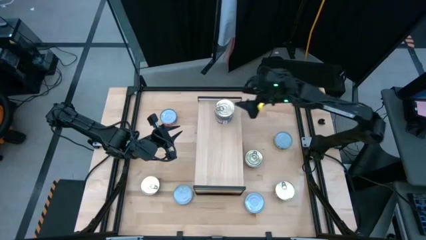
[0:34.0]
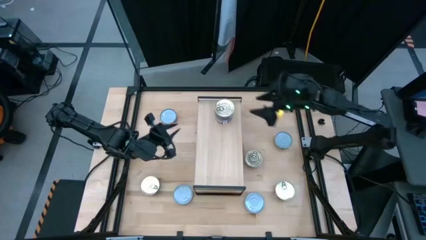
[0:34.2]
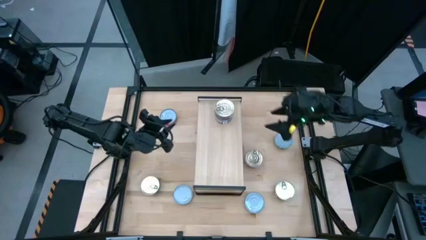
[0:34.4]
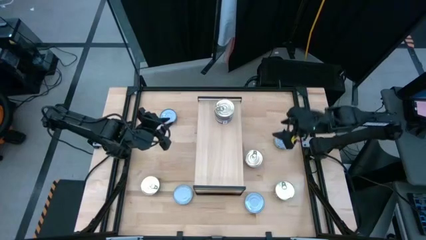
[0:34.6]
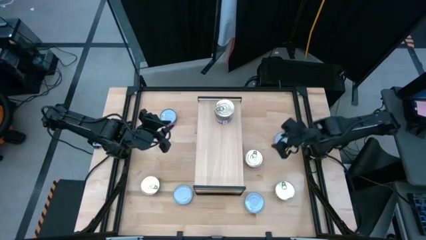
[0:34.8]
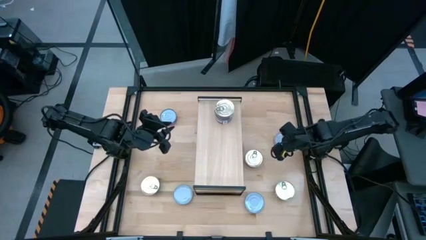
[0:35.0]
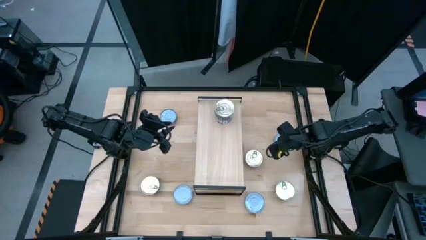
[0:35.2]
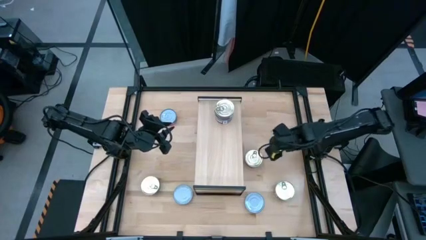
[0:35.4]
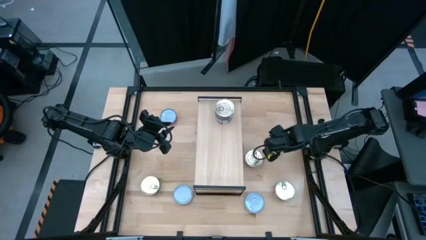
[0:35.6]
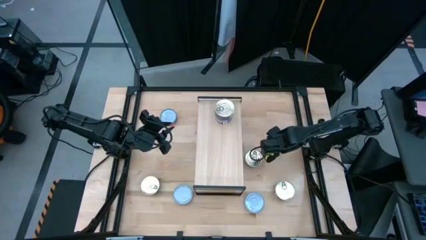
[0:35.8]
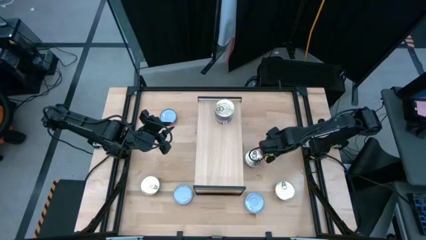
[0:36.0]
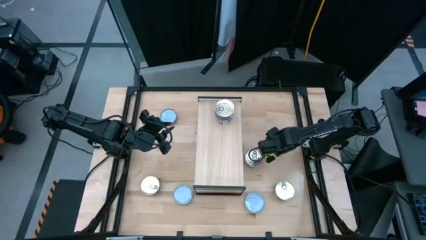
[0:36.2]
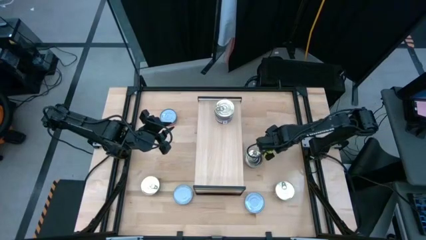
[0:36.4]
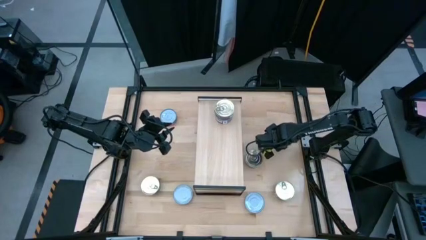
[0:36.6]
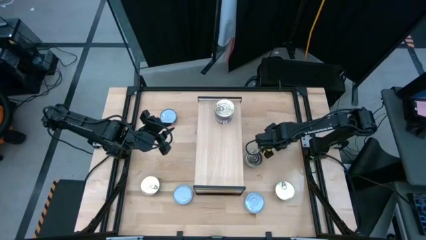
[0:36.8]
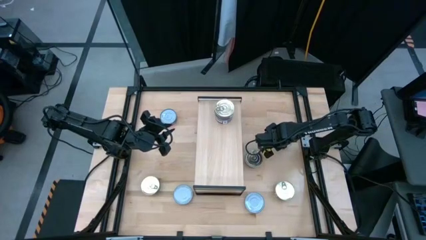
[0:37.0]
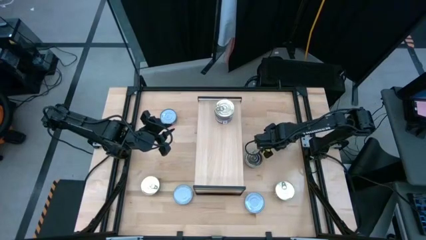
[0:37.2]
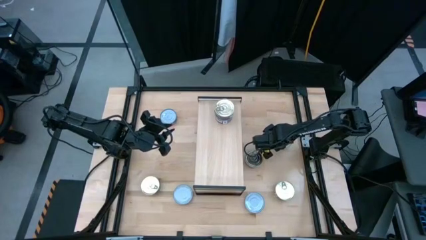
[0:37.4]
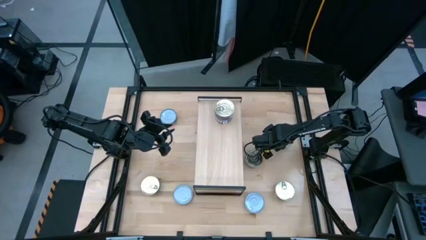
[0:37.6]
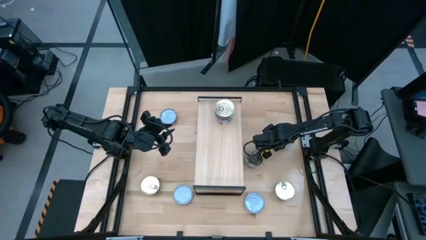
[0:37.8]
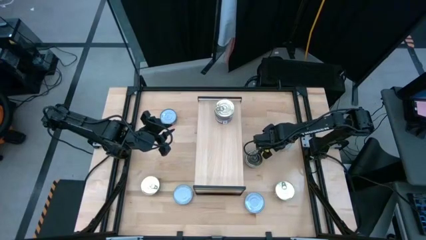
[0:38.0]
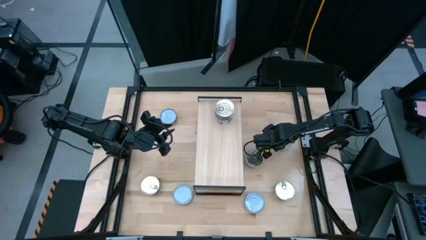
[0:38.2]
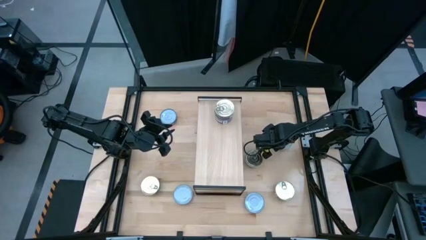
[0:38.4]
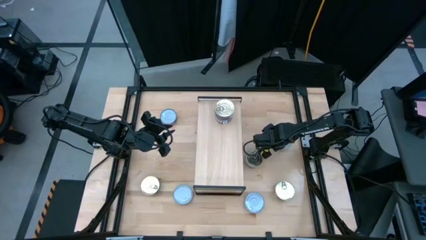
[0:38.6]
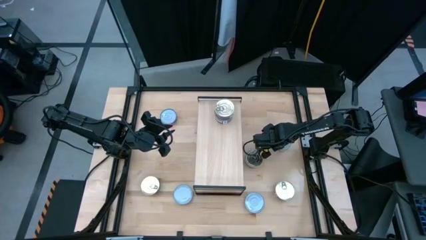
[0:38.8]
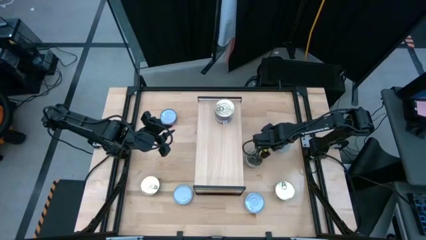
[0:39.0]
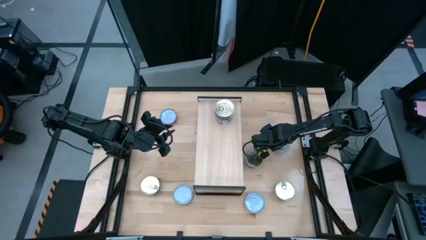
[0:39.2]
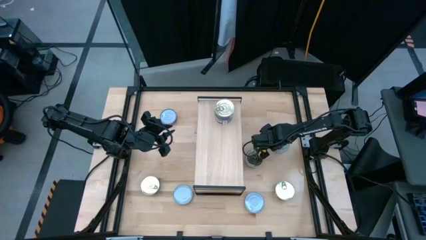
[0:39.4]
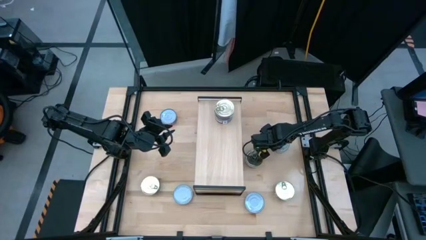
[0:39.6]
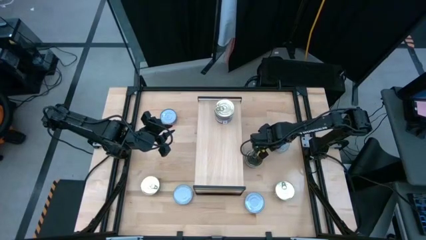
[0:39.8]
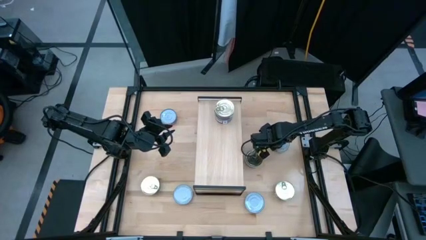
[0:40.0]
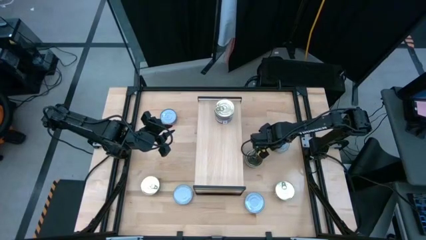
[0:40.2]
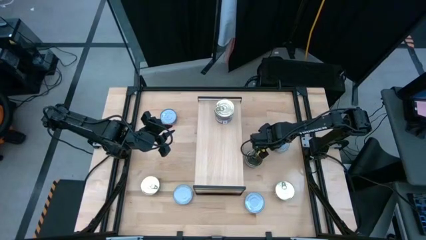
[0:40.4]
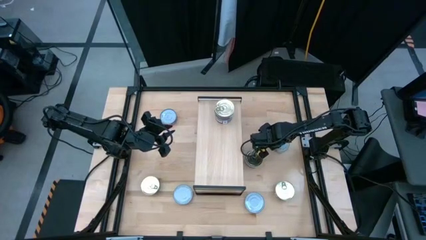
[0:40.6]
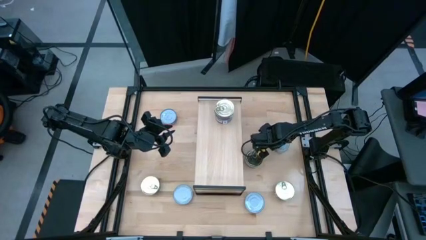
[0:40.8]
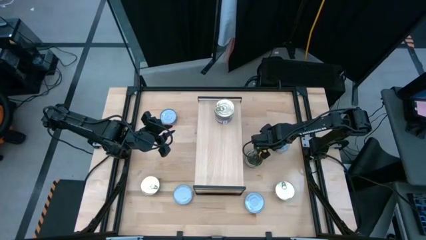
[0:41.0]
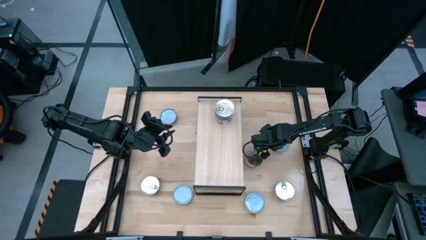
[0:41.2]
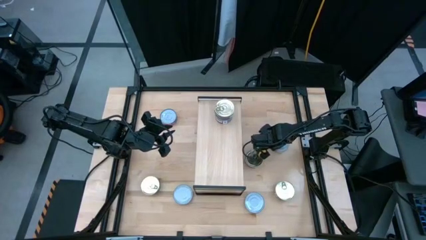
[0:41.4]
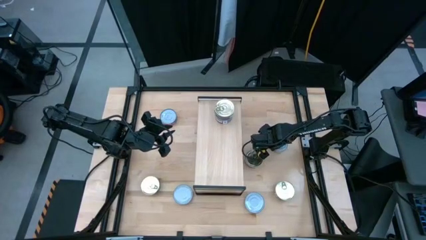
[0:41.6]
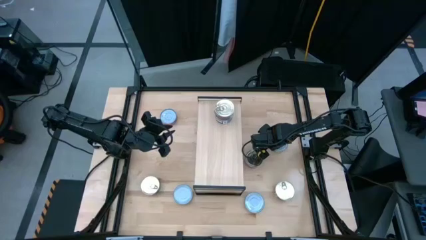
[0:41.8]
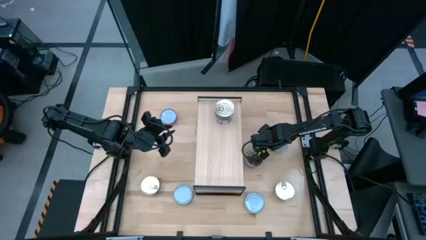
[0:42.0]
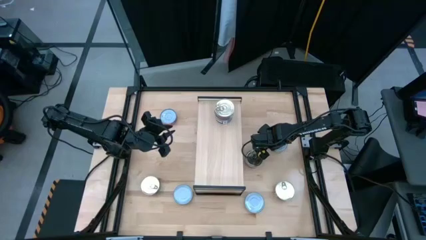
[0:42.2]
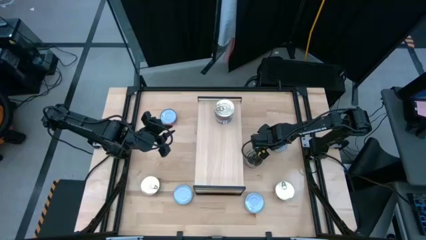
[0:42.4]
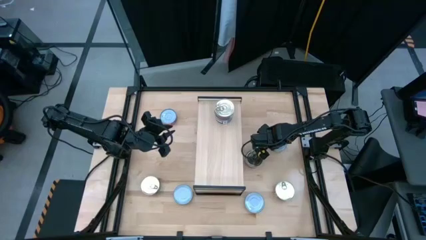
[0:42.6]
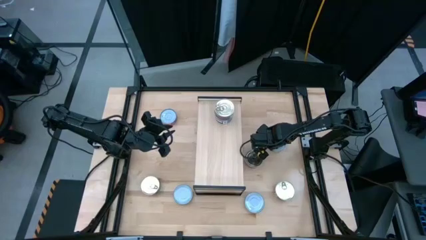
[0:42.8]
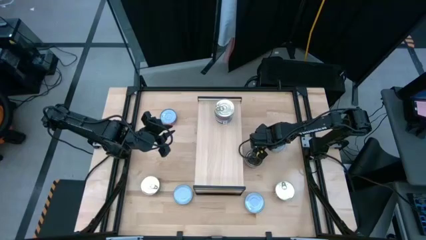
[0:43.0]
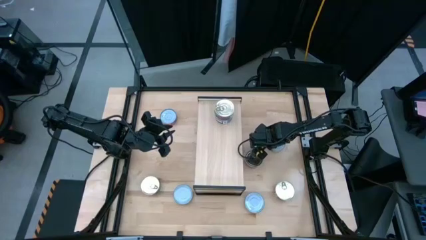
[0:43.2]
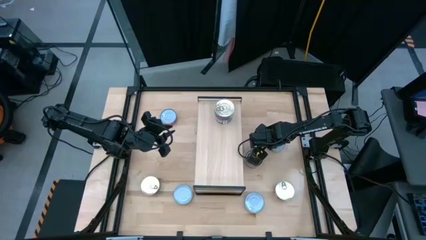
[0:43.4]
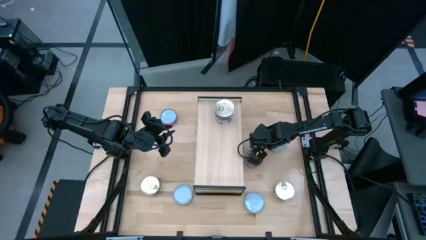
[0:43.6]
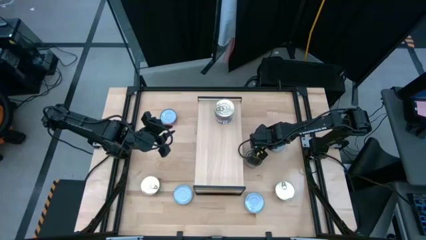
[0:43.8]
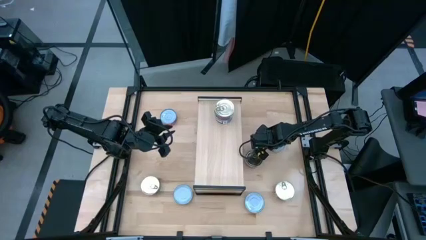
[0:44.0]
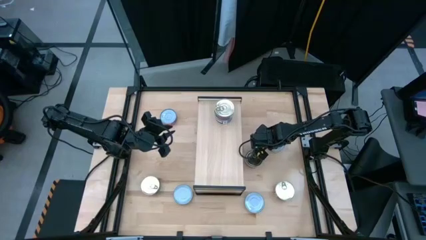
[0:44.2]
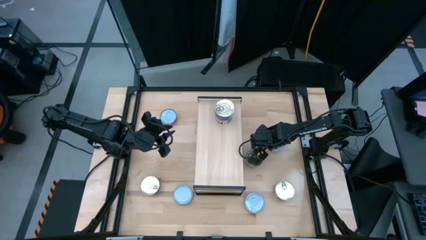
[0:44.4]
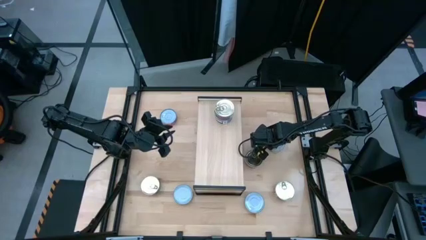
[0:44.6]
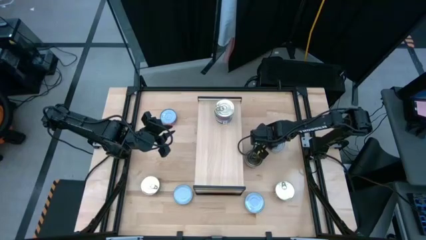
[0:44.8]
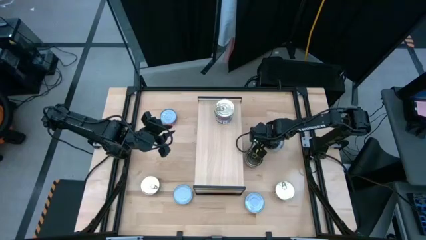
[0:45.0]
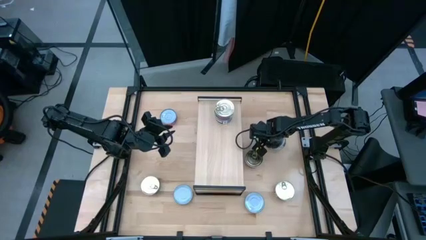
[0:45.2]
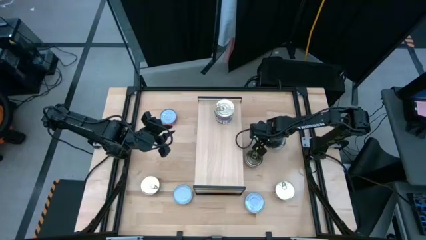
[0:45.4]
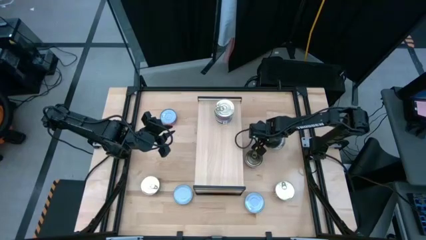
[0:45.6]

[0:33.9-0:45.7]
Task: Stack canned seafood by type on shelf
Put the green white tuna can on the shelf

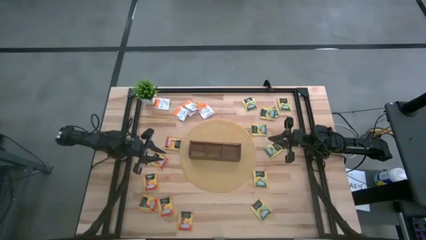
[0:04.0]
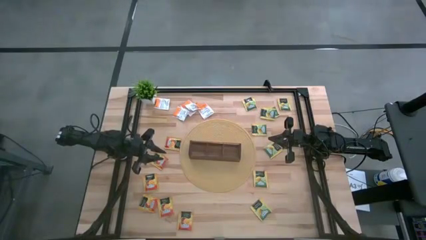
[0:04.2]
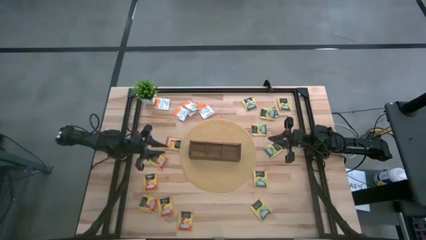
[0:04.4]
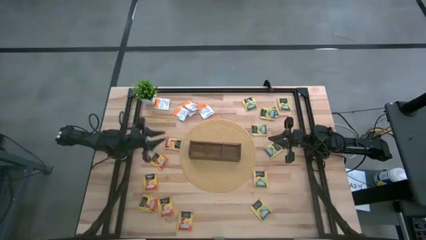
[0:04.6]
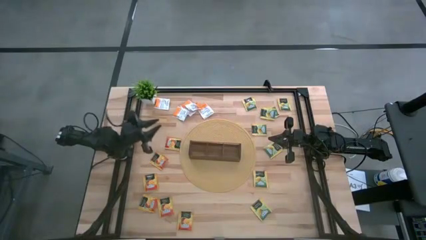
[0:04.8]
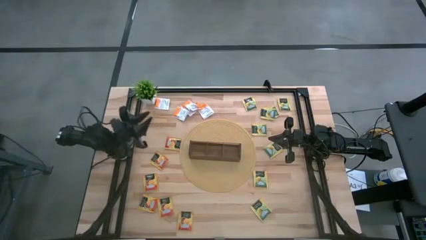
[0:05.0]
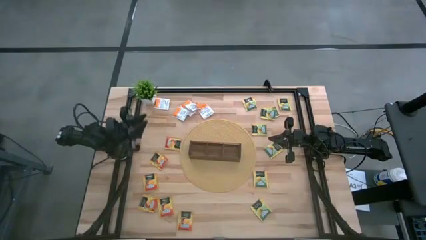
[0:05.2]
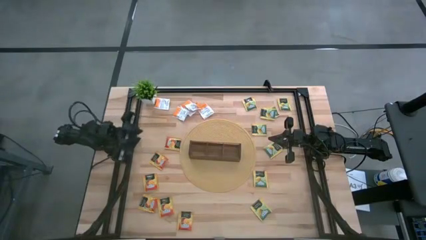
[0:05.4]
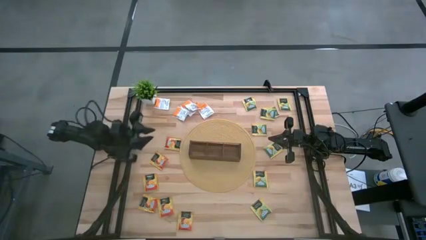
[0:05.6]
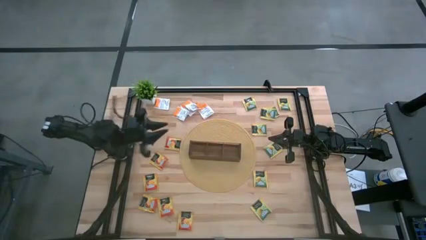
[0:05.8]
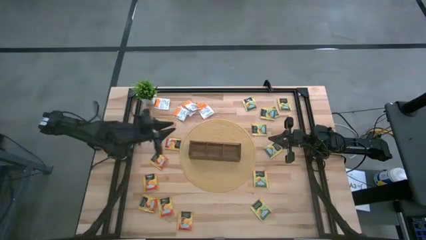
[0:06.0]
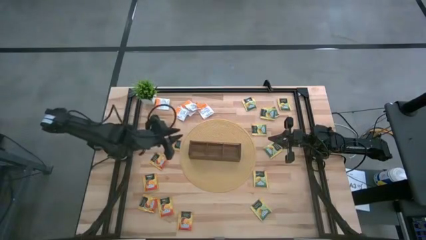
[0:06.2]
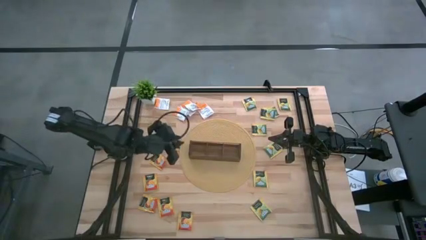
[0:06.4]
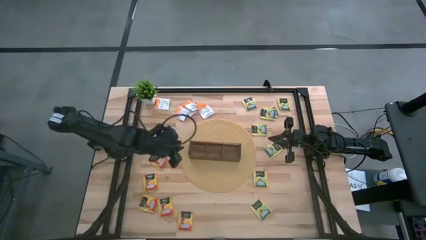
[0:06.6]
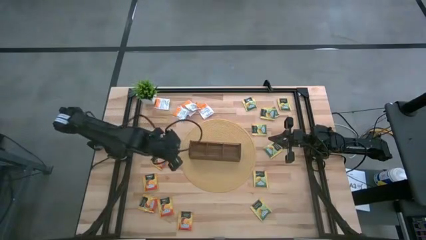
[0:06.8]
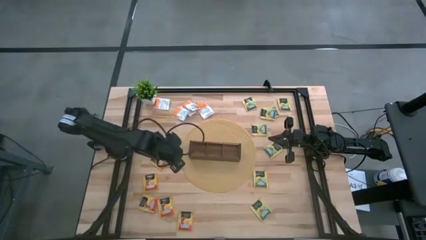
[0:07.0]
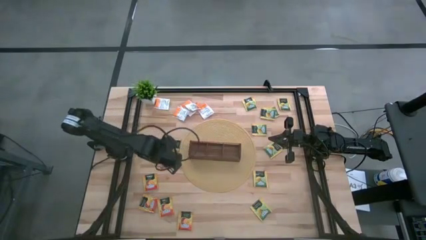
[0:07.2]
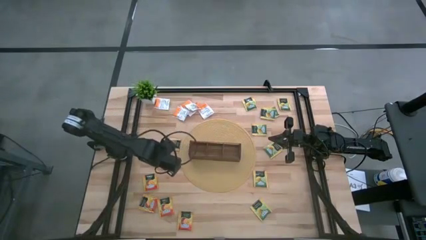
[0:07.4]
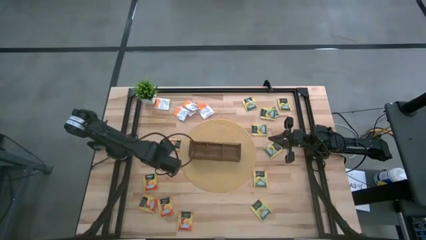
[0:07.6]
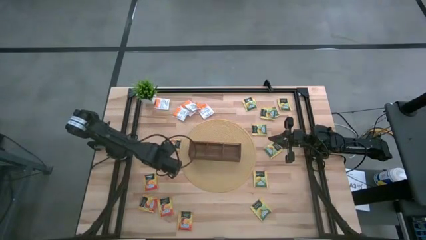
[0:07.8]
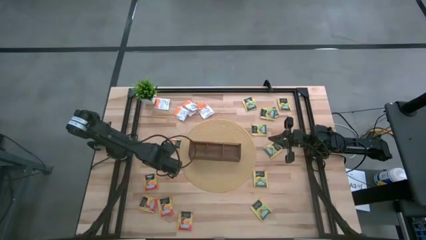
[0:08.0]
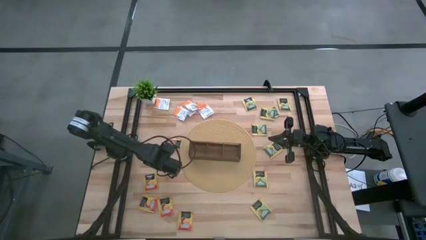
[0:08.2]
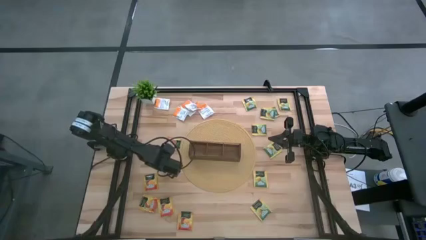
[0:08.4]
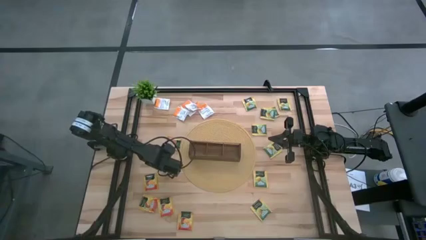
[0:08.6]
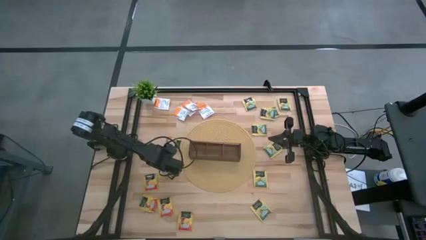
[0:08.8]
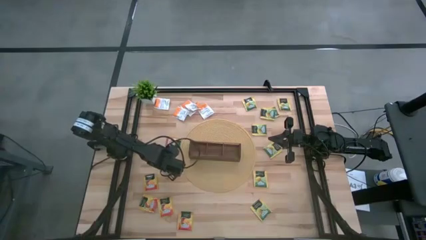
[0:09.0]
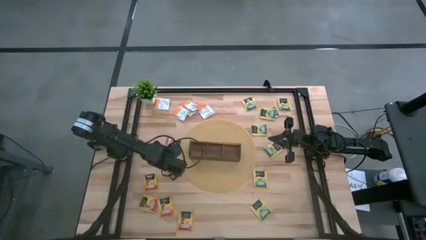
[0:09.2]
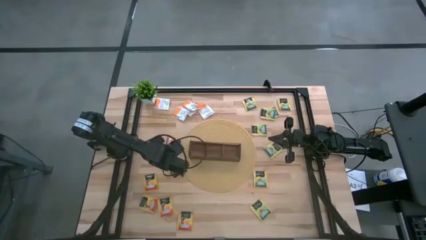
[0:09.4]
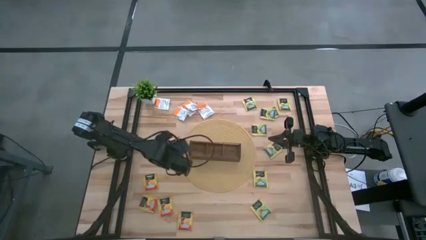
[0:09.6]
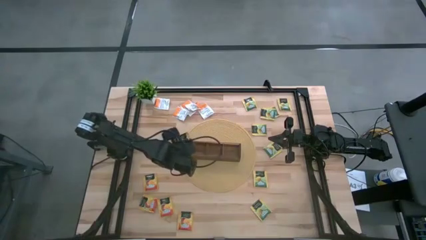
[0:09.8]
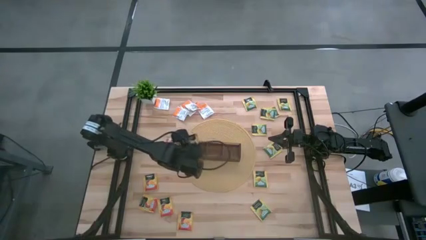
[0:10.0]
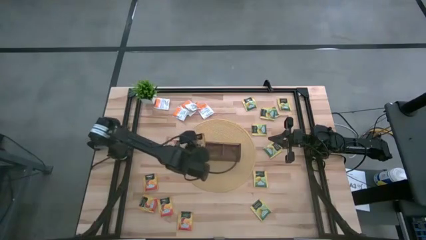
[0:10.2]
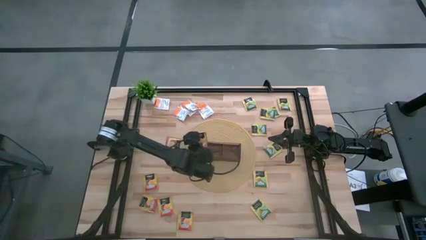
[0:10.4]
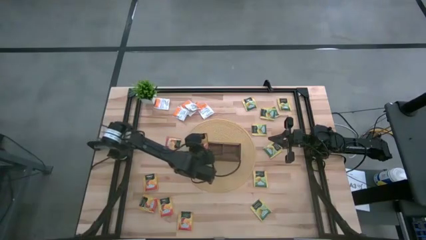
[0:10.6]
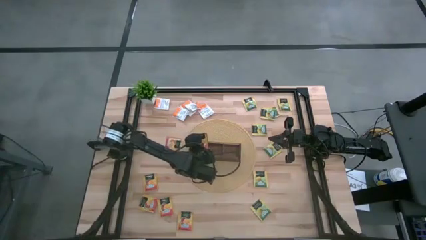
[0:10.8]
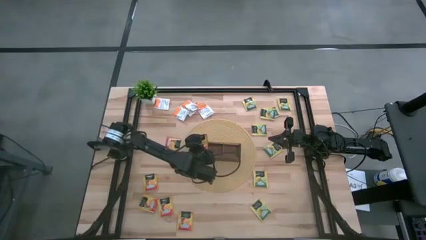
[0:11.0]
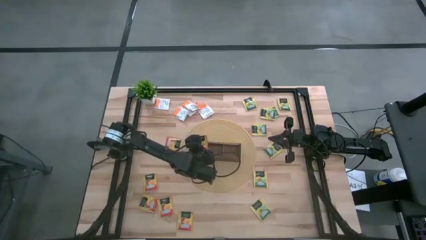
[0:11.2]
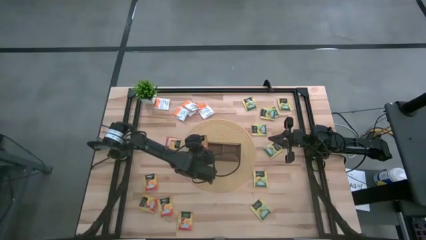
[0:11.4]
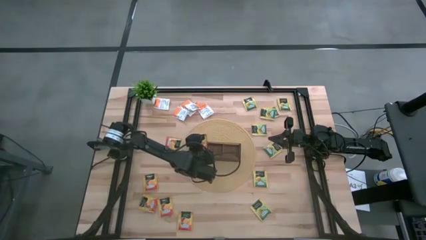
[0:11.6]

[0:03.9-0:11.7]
Task: Pick & Place Tea
Put the mango tea sachet into the left section of the wooden organizer
